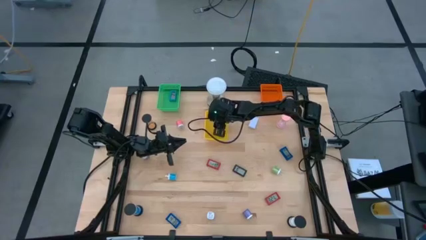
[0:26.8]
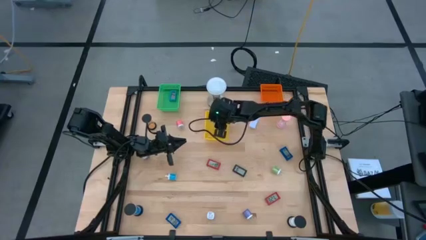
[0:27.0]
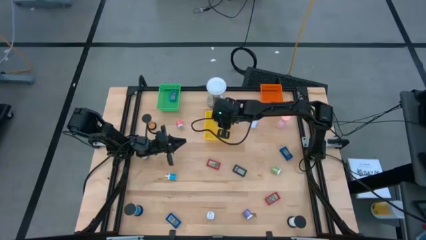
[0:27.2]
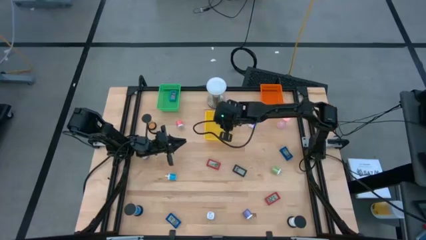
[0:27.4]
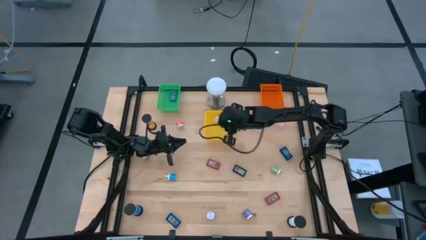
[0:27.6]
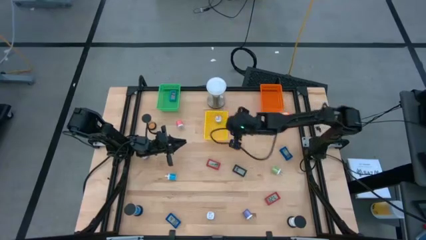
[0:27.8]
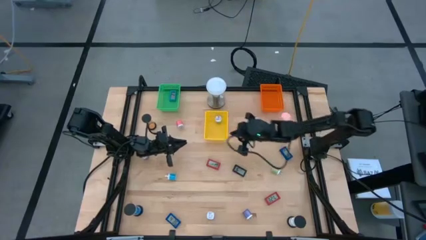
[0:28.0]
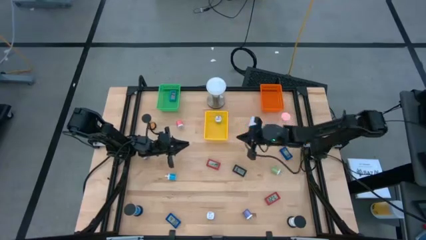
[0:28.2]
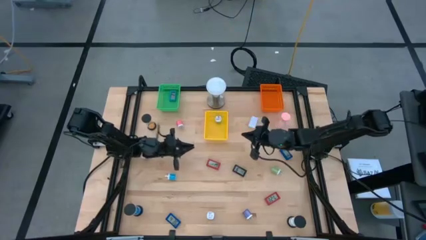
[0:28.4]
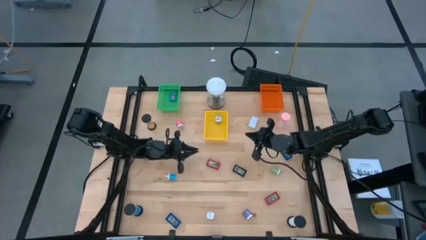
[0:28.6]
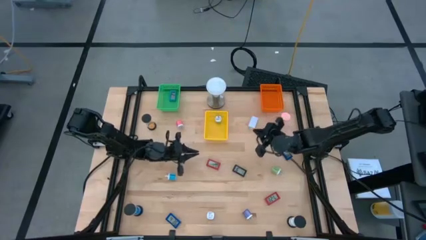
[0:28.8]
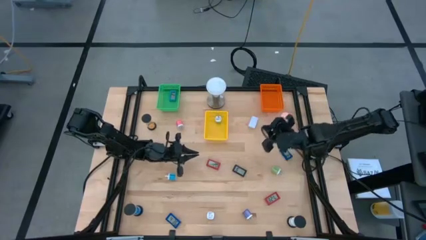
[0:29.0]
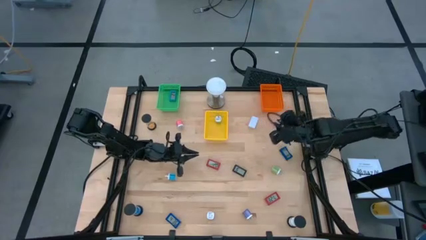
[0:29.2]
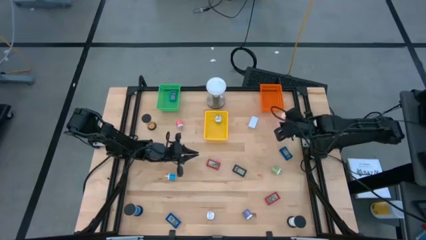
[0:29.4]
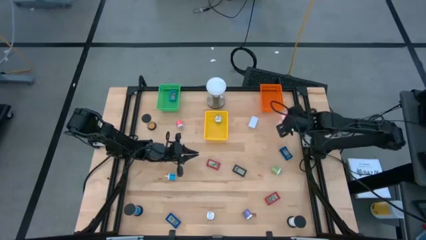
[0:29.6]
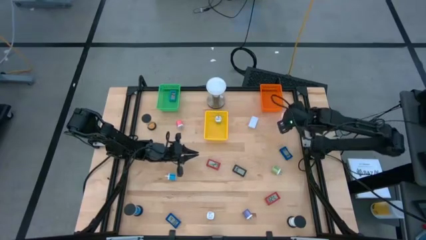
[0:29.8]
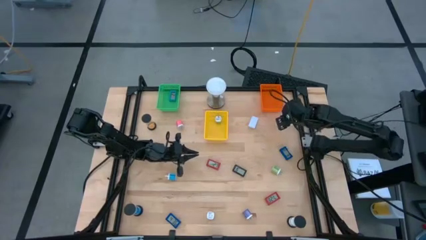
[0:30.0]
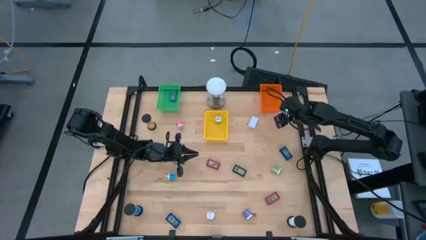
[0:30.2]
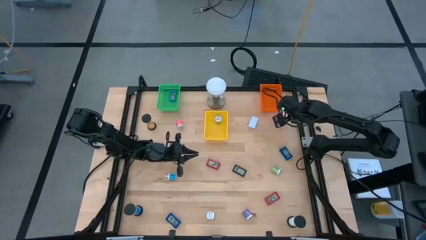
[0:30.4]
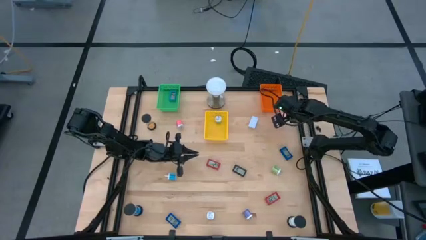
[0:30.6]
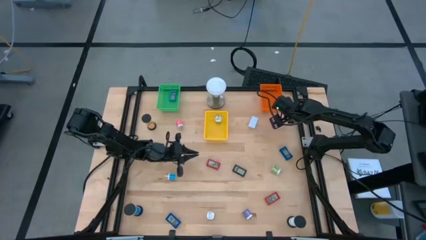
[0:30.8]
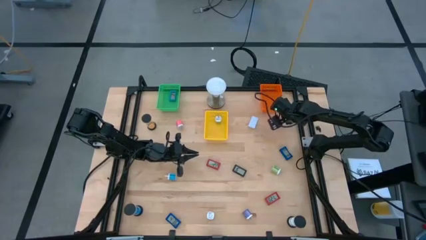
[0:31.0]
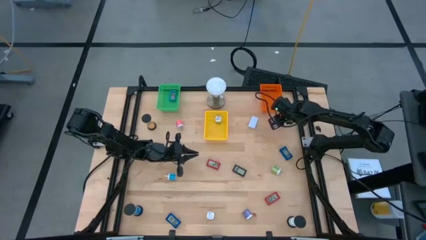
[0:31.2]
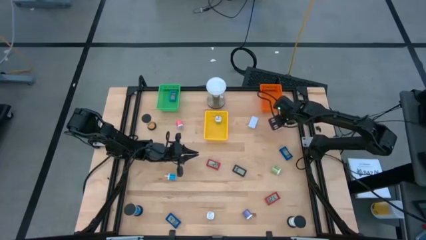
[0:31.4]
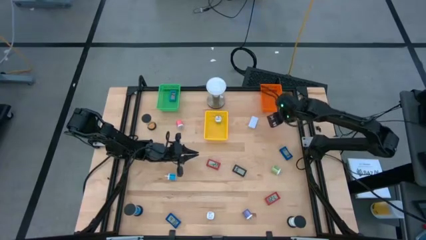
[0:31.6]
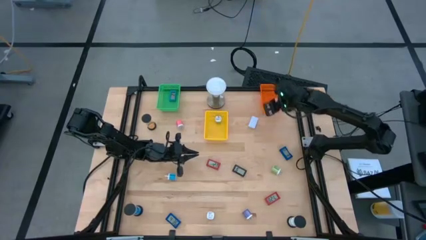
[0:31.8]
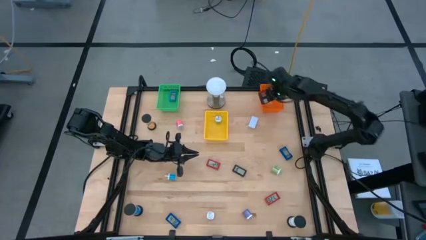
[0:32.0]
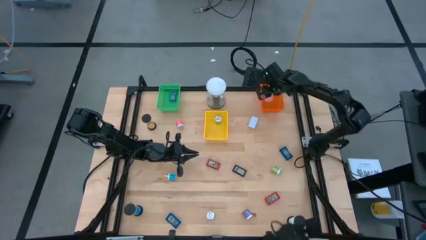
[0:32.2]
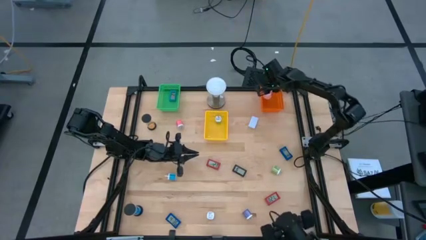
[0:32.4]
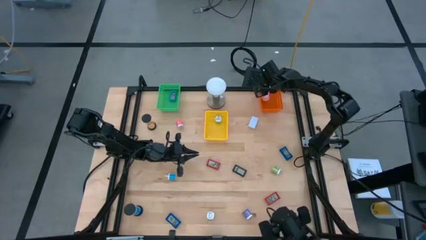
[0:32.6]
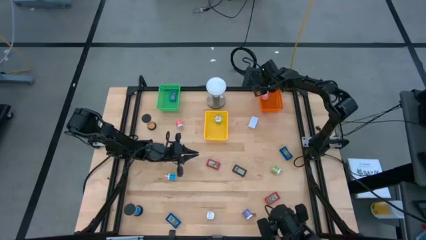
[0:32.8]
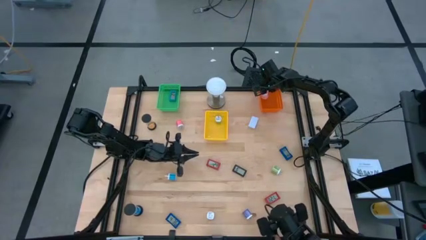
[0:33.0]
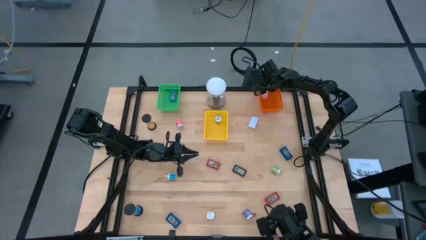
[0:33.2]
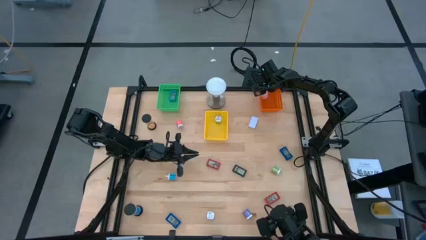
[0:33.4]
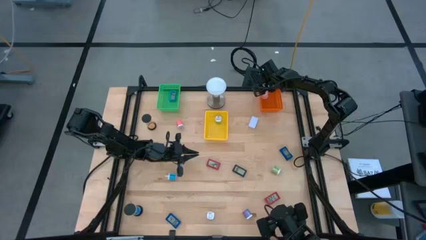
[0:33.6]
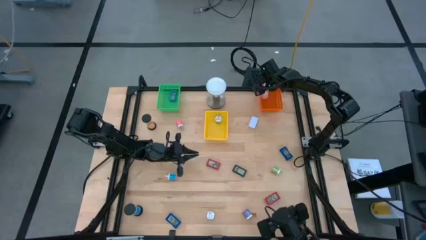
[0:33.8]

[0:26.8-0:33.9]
Task: Pick & Place Office items
Put the pink white hourglass into the orange bin

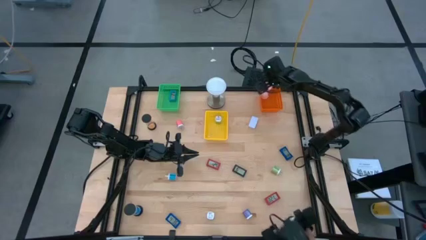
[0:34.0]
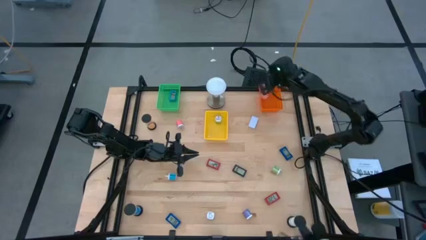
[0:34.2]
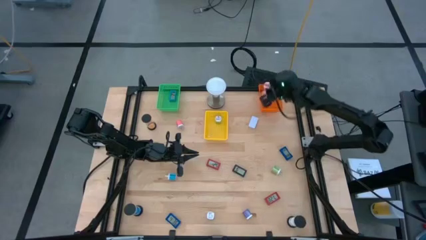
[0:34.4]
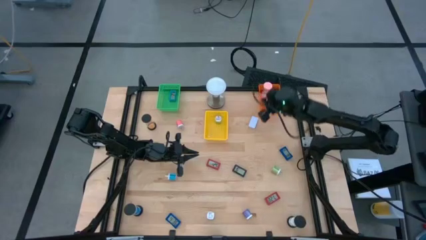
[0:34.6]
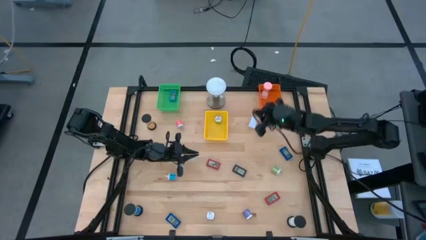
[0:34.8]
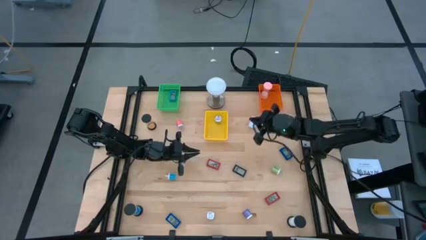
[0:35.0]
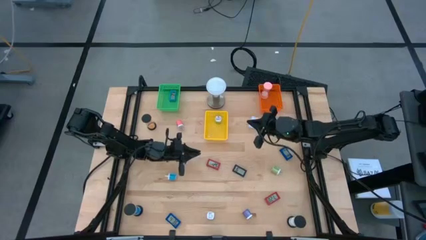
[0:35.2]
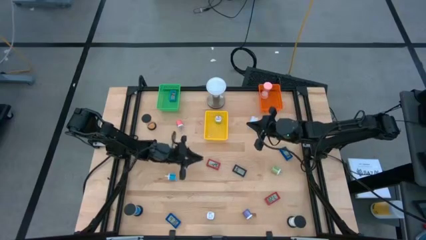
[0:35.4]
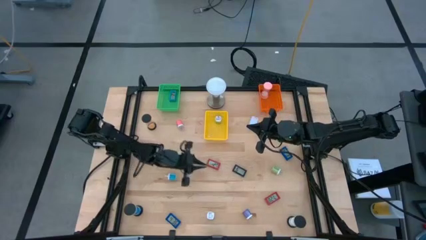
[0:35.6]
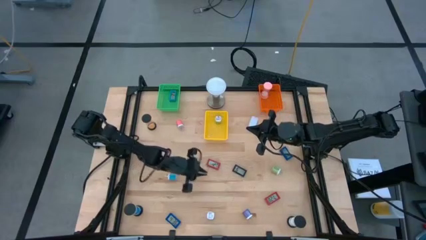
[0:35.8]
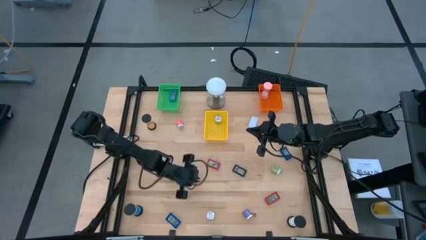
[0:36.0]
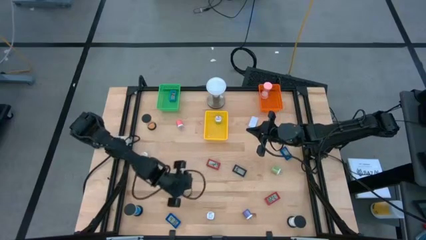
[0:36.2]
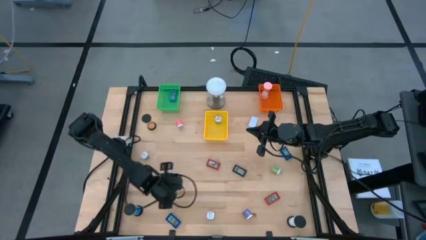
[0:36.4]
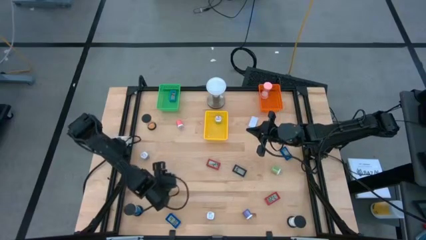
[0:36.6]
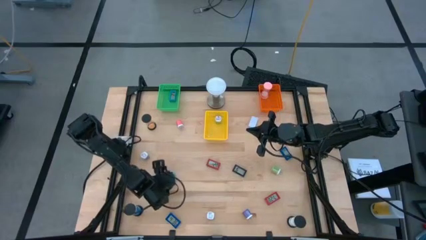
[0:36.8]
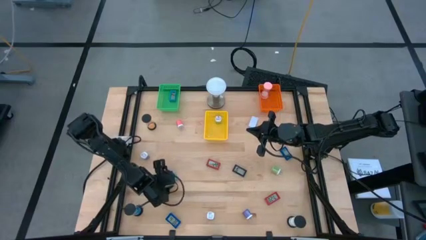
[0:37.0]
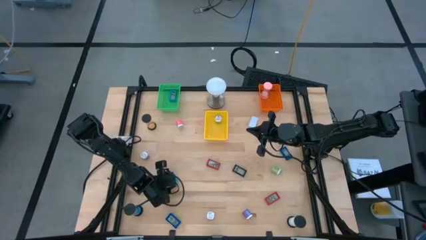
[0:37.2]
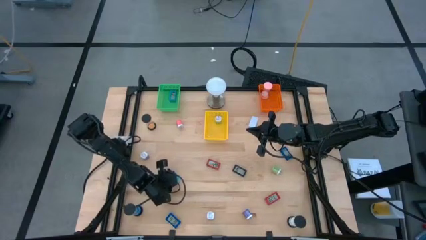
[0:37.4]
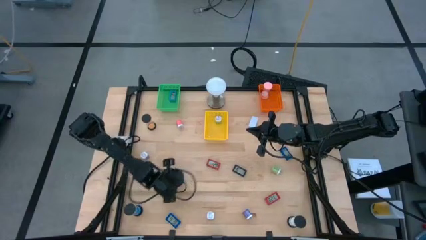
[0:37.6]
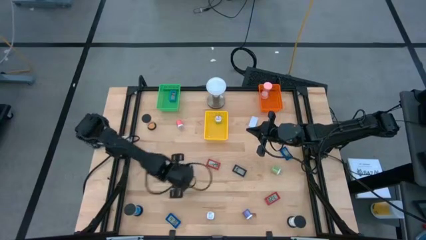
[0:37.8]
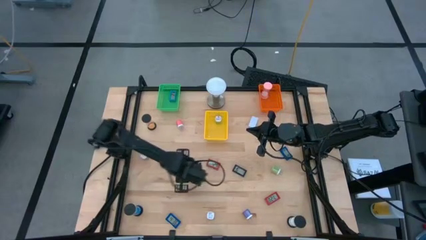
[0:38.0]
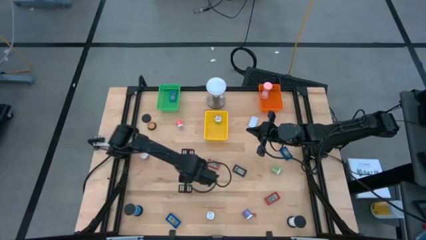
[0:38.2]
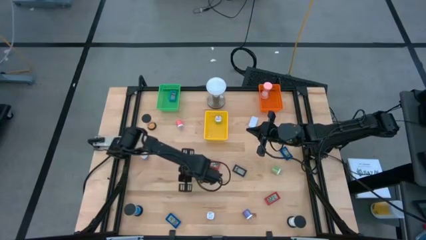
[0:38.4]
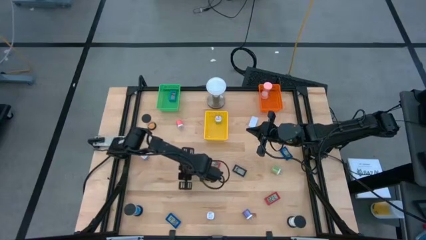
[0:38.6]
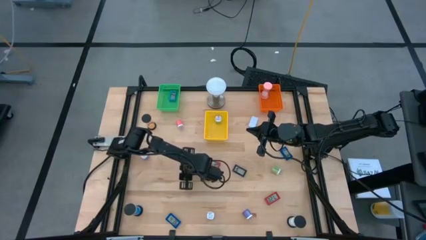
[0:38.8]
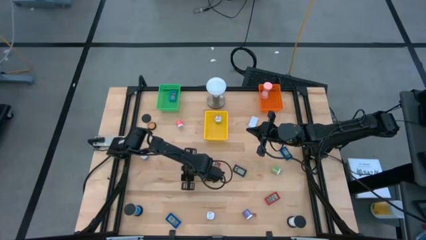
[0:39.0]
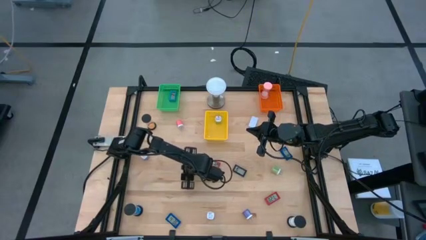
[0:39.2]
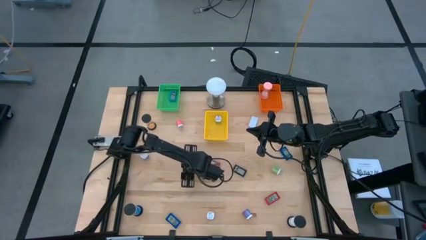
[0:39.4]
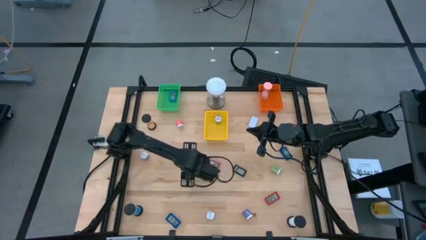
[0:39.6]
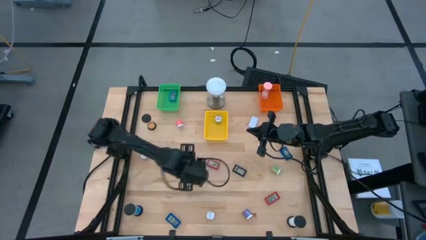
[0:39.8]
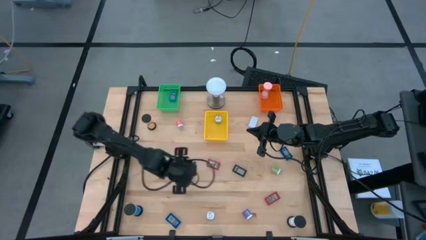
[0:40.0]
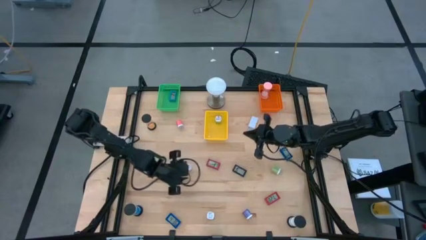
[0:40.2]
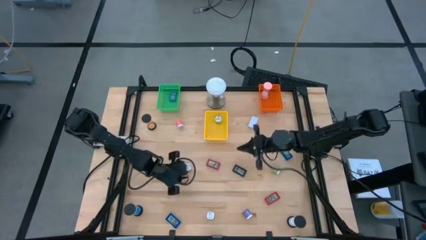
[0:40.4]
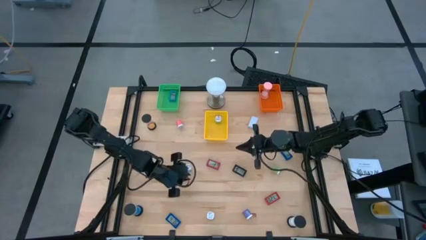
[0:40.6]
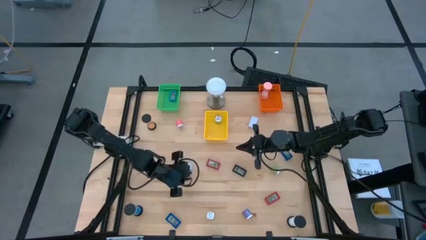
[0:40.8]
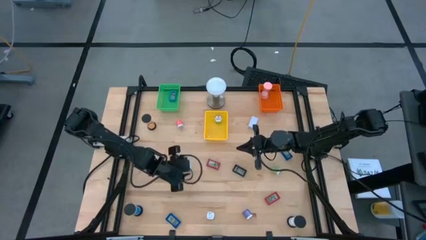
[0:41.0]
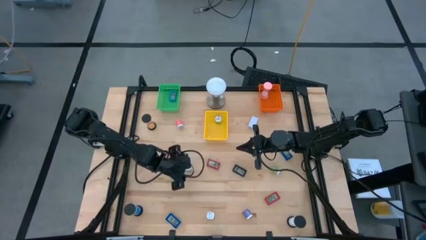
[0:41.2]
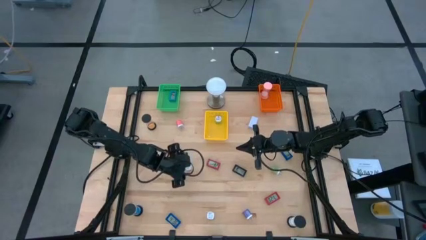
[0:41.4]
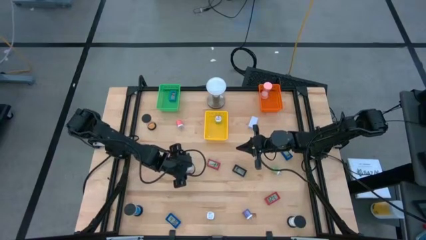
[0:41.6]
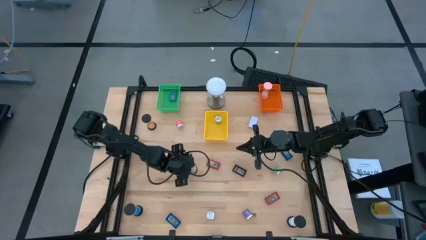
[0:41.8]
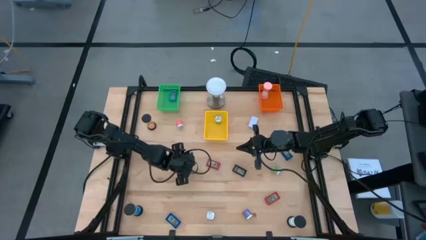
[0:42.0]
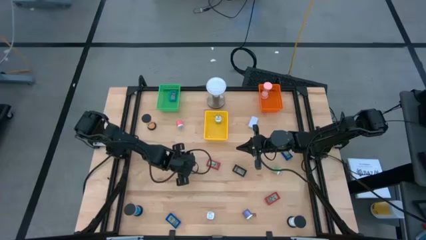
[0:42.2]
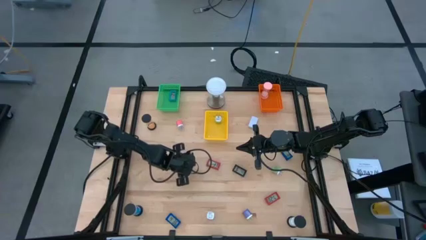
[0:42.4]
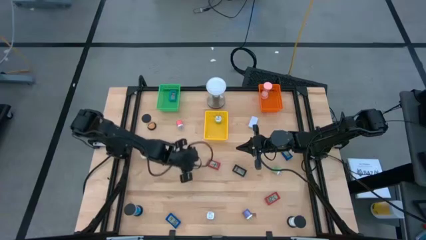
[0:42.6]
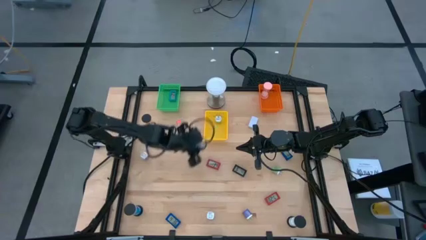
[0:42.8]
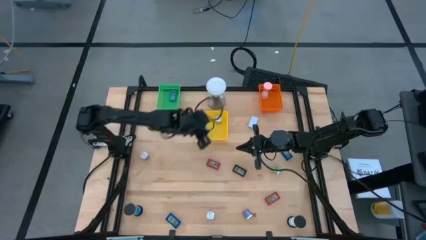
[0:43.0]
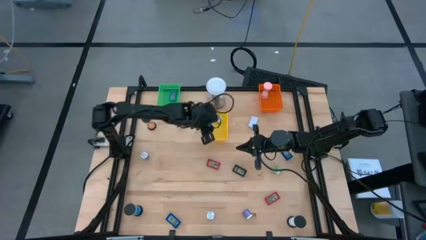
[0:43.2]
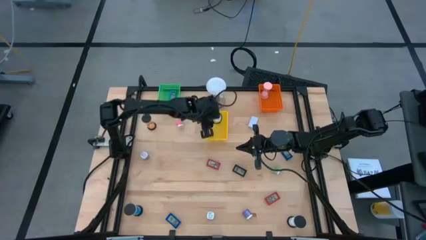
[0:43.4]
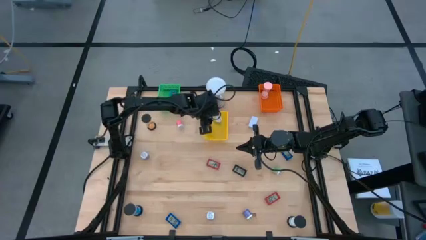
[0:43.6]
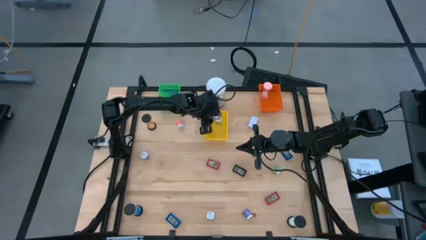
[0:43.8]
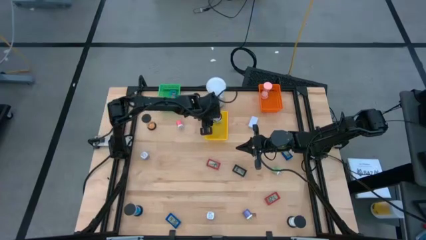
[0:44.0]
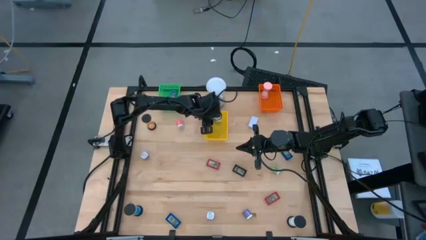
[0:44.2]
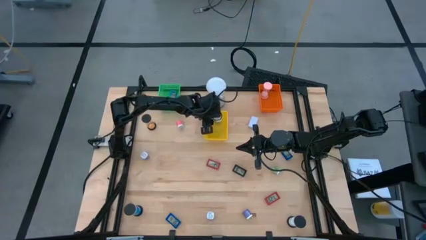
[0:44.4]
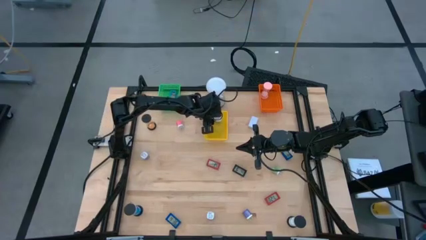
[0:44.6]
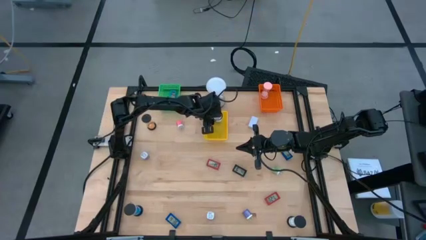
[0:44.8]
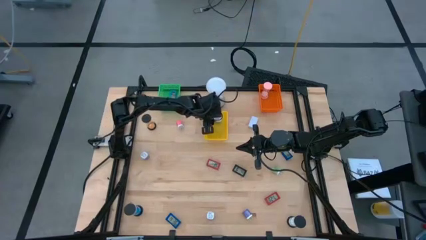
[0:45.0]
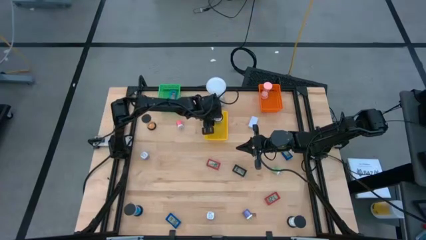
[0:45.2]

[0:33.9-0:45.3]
Put the blue charger adapter into the yellow bin
